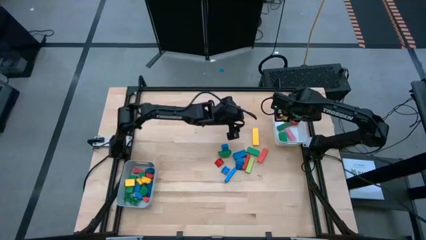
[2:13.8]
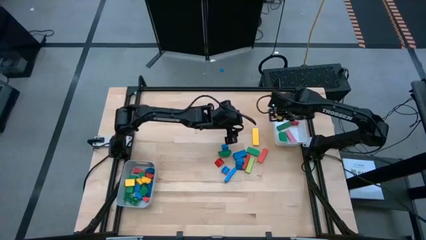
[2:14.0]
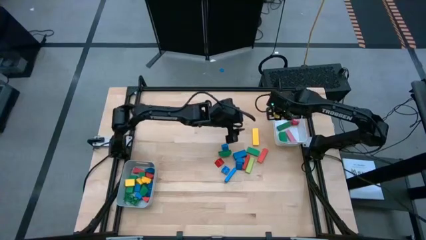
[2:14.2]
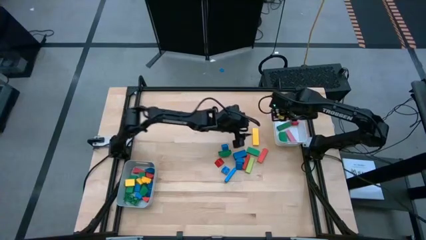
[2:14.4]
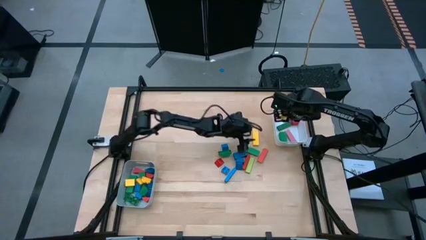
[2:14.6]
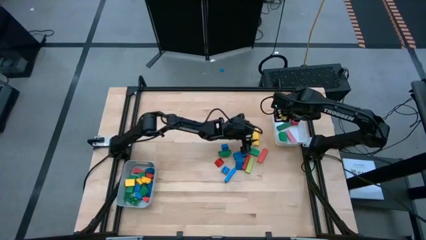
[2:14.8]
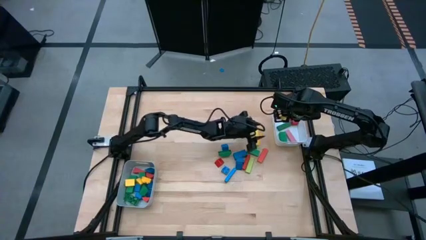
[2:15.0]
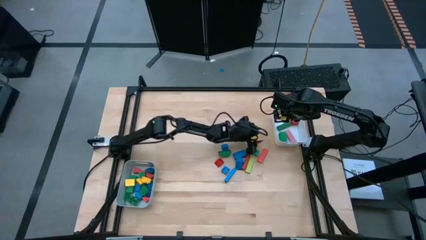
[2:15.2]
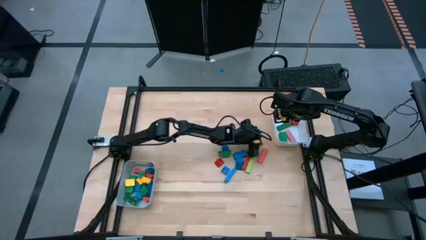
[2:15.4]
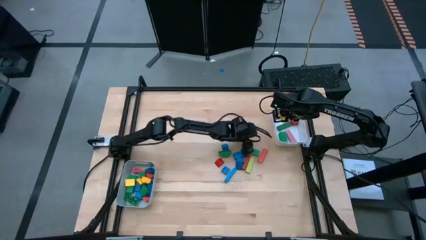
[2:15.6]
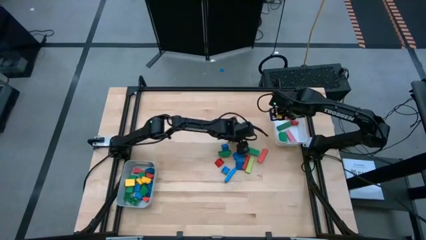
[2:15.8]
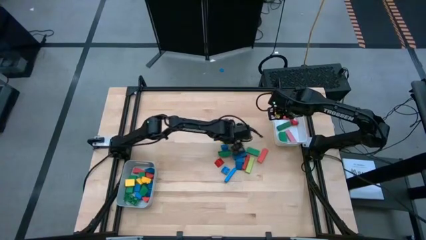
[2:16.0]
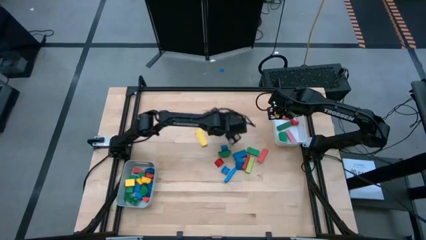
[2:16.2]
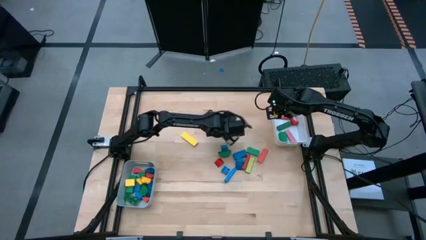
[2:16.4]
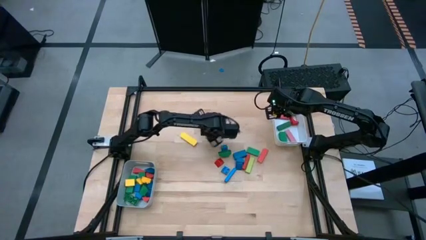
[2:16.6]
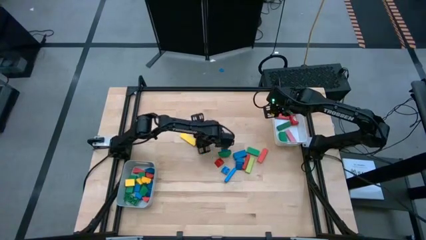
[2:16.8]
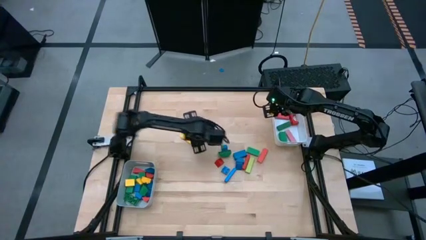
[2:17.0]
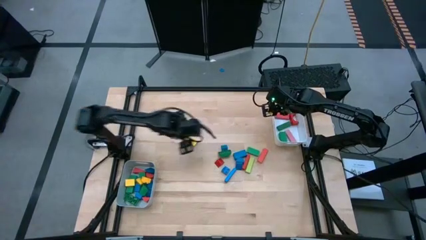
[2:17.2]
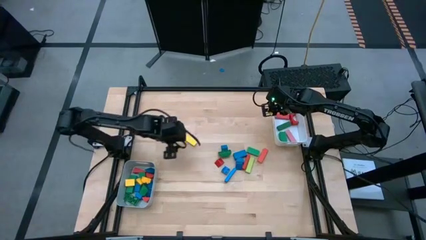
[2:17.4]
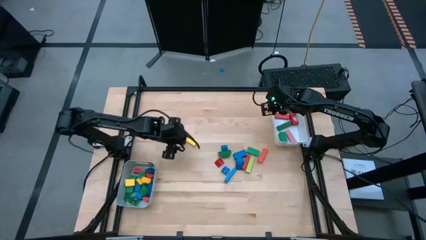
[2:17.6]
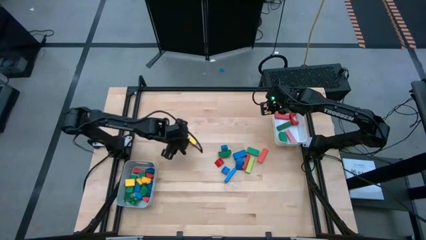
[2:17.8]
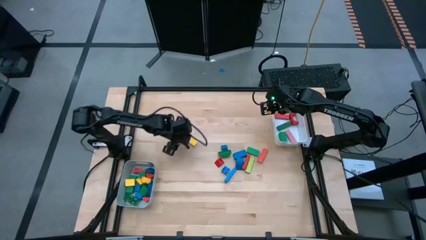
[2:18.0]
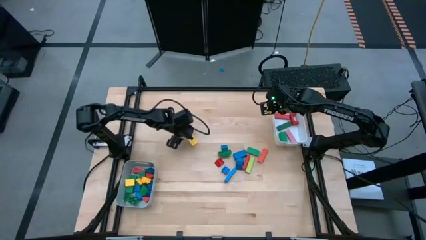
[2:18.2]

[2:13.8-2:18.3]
Task: Sort blocks by size
Put the yellow block into the white bin

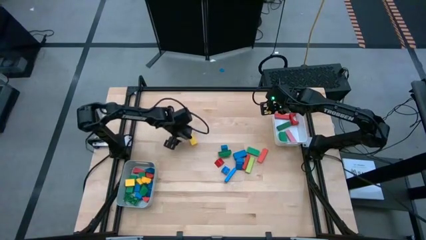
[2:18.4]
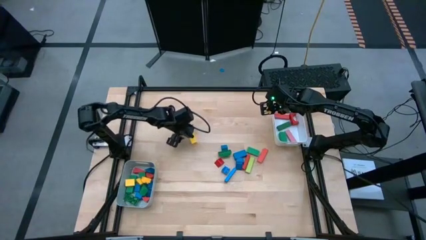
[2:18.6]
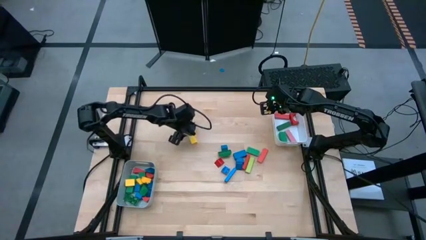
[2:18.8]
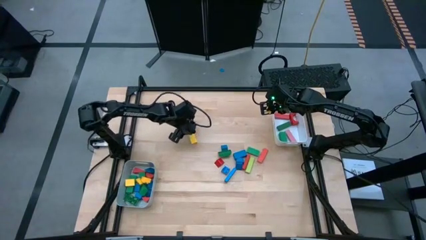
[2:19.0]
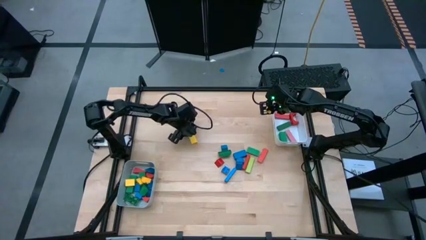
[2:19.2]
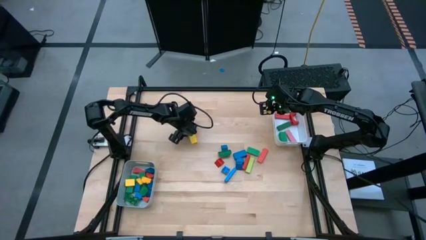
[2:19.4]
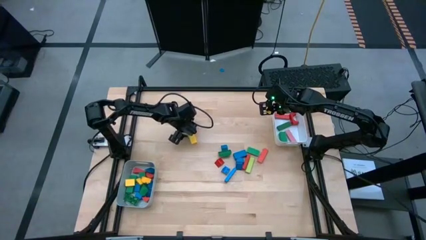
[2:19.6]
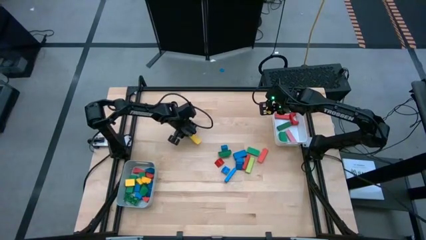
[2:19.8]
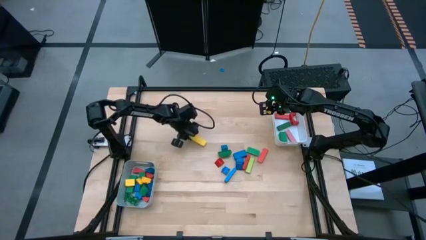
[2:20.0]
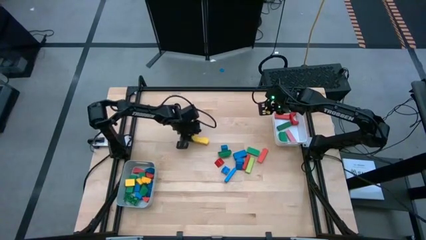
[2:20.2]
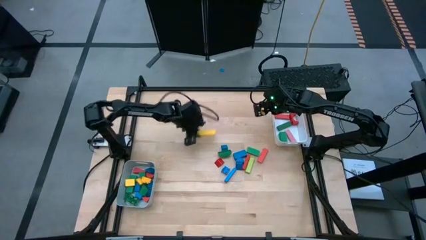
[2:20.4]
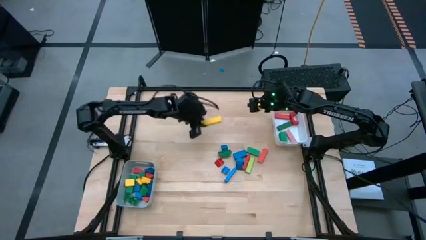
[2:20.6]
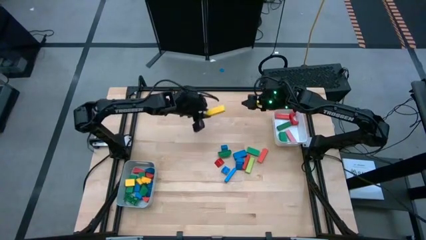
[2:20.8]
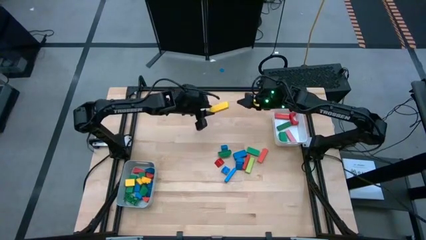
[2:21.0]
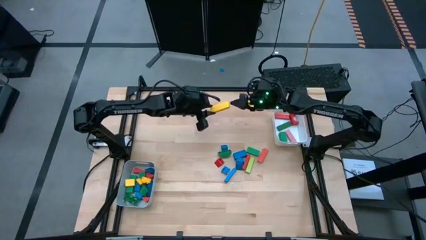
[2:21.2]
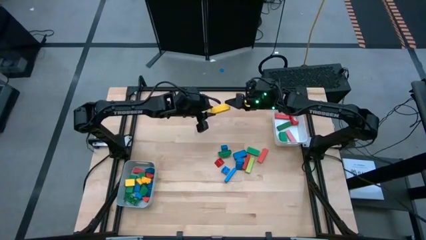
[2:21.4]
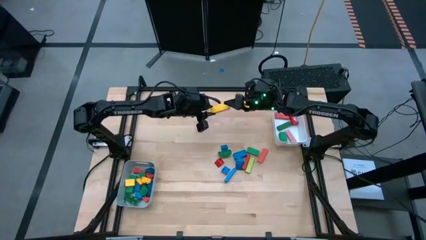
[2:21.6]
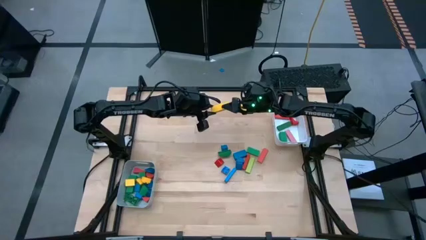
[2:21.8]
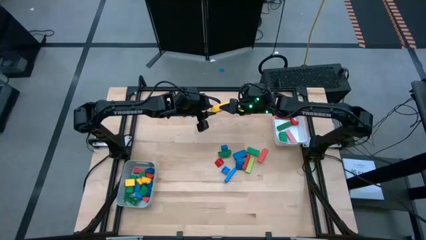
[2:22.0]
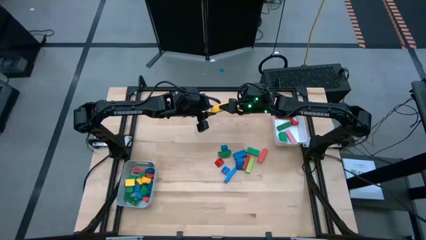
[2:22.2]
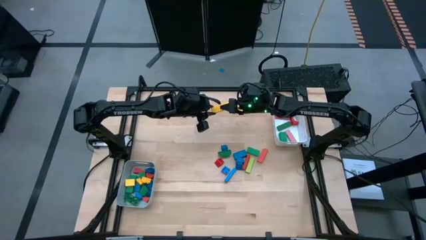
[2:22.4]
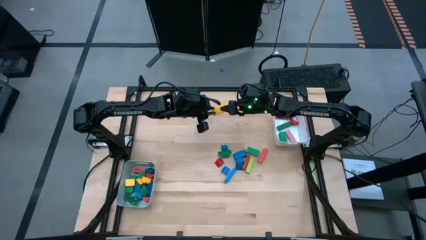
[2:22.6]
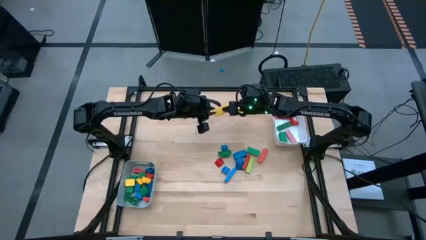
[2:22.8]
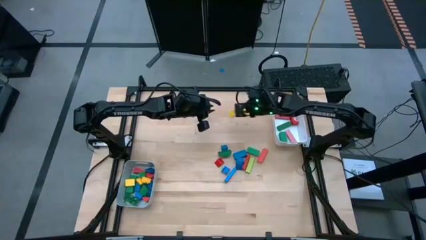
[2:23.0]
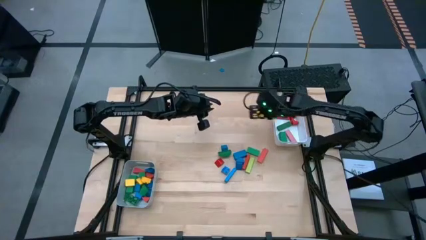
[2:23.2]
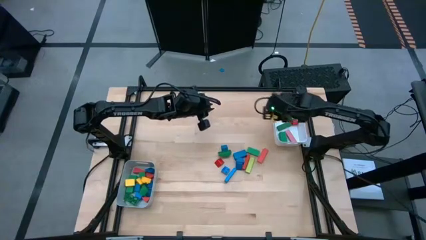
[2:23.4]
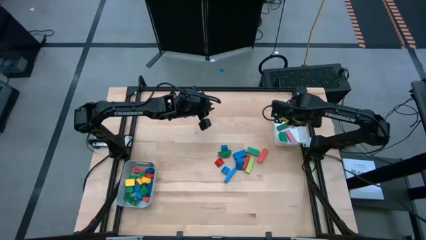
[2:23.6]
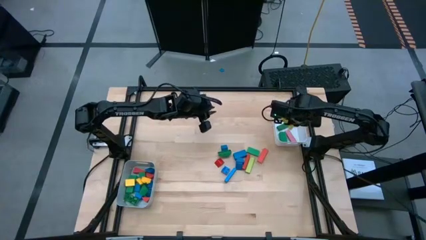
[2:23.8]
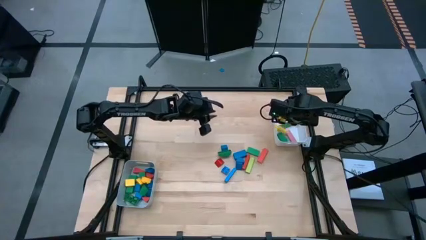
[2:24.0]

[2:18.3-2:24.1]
Put the yellow block into the white bin

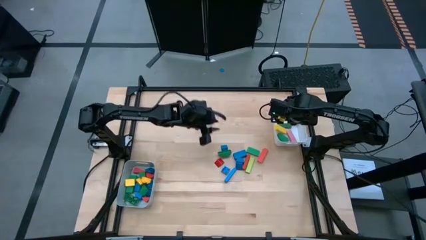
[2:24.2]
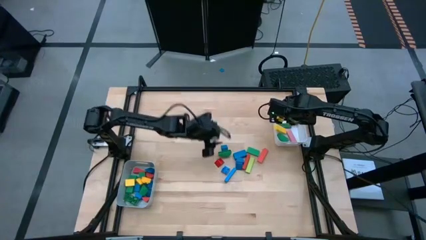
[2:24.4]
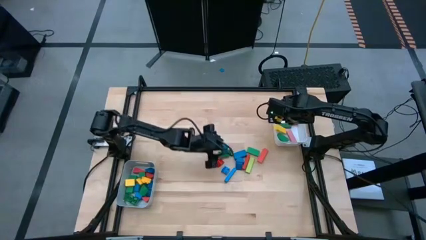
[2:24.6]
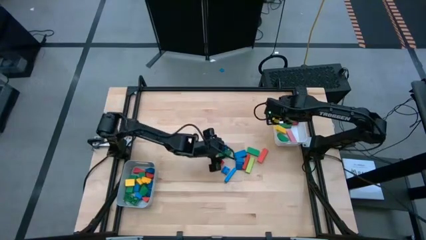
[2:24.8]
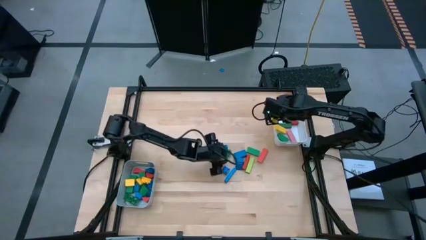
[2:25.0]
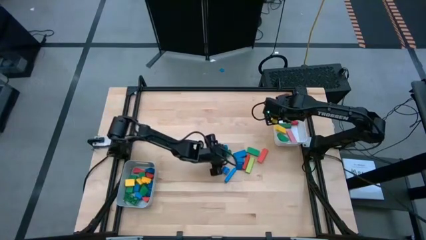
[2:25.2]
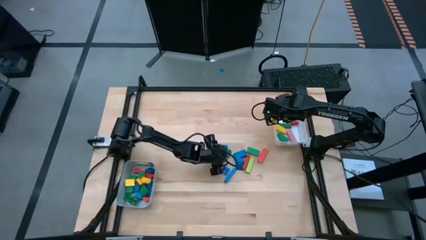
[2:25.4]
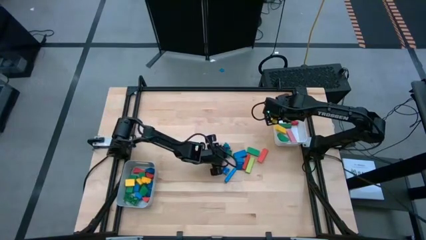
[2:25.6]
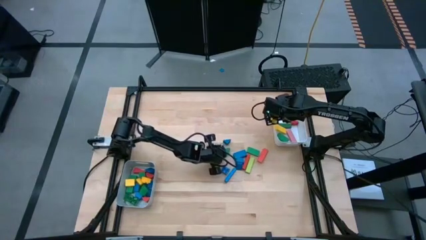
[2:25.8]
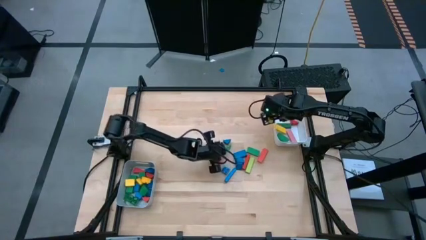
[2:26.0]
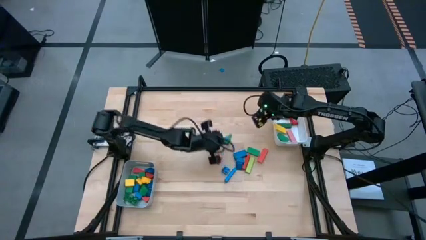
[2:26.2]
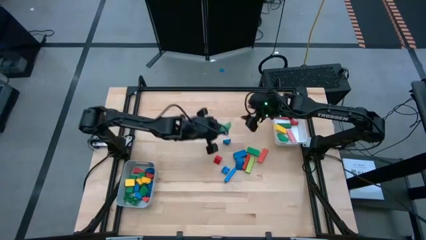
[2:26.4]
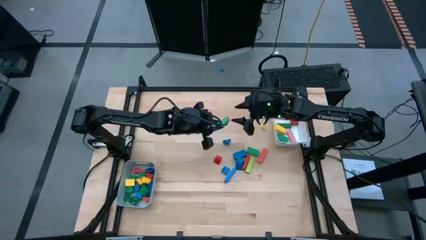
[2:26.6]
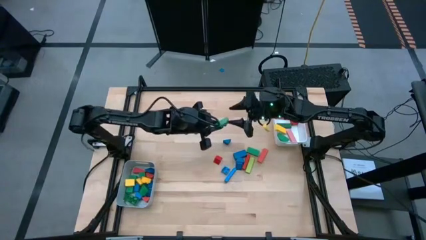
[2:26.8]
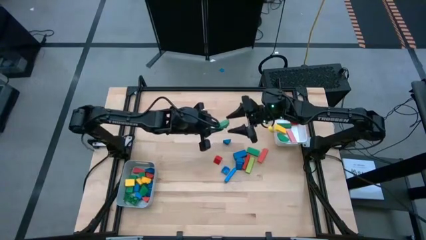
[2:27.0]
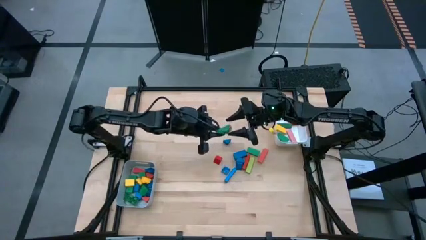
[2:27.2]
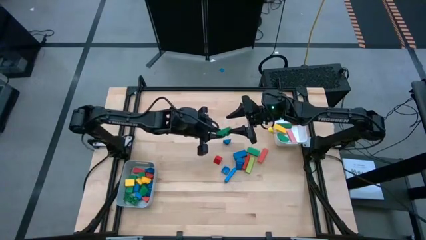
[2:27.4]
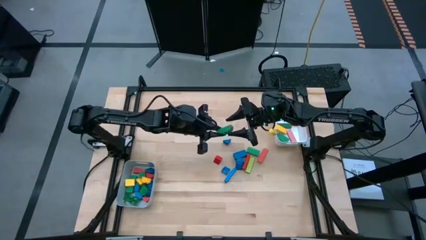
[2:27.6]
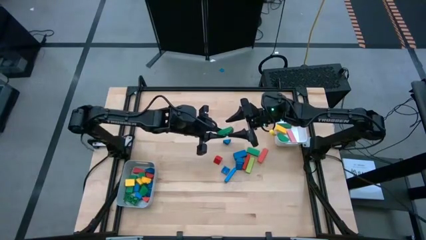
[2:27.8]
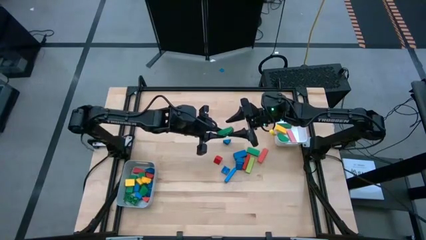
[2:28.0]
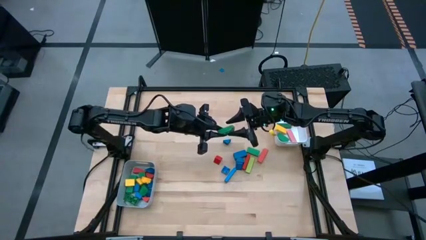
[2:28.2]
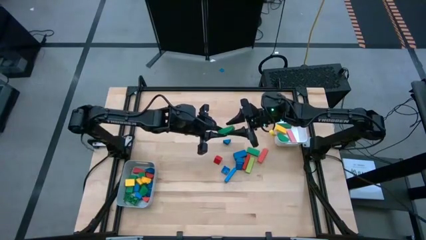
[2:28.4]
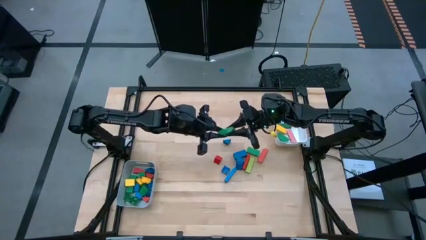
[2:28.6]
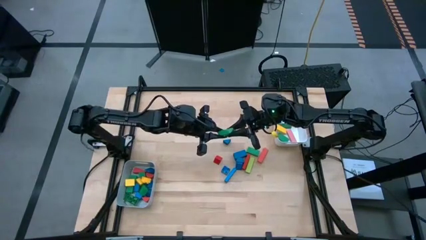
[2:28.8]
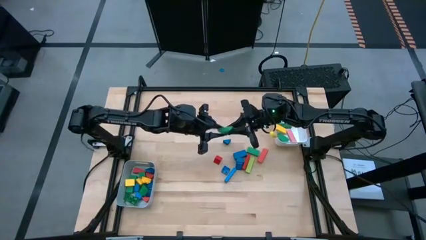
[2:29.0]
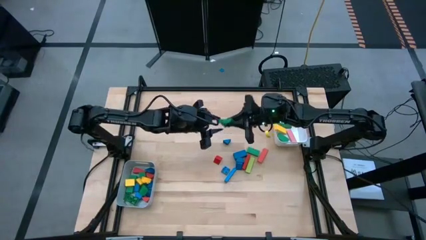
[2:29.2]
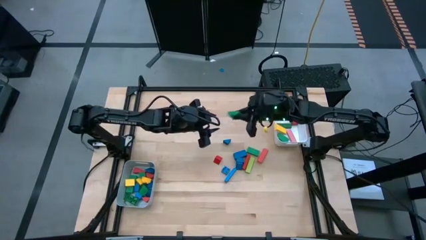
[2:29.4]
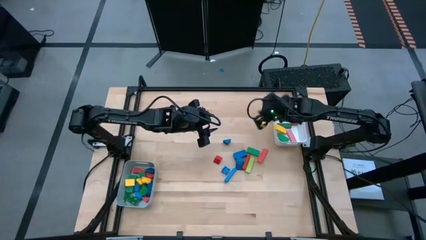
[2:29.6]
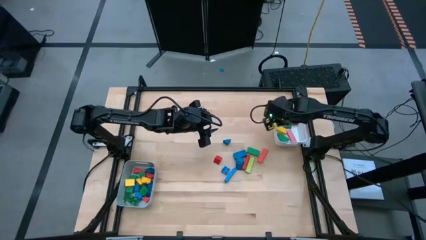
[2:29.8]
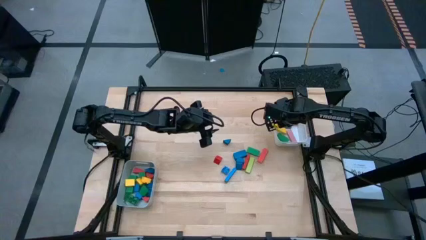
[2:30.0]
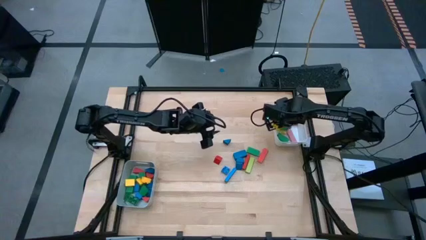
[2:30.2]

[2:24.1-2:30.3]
Put the green game piece into the white bin
